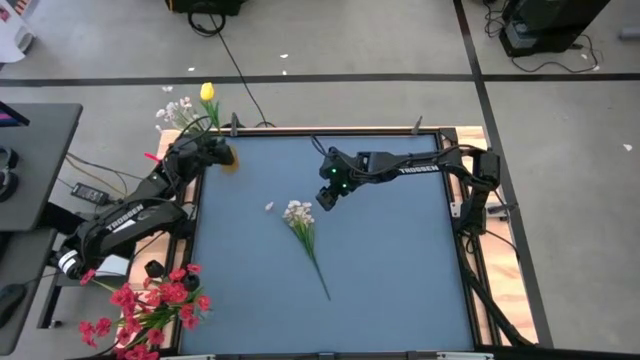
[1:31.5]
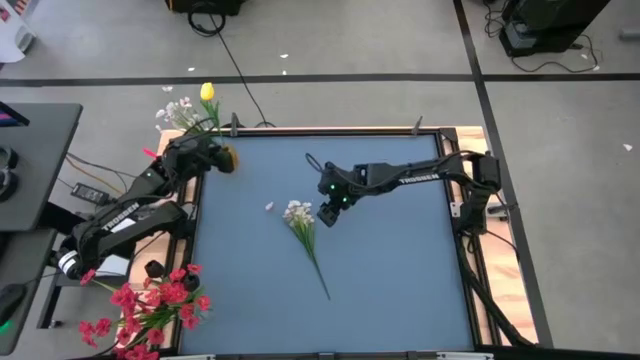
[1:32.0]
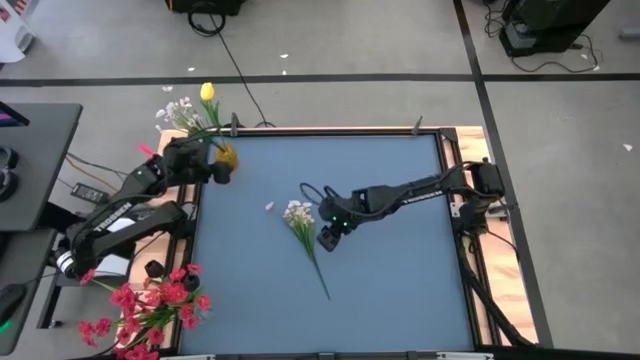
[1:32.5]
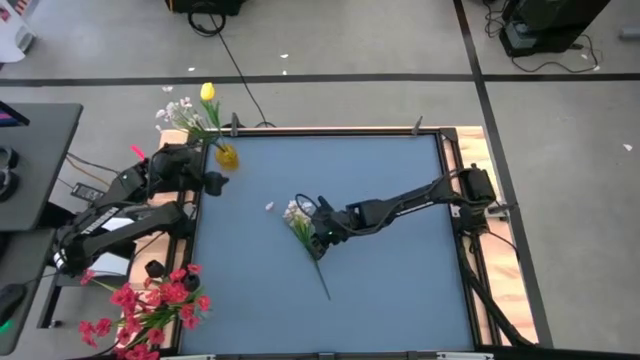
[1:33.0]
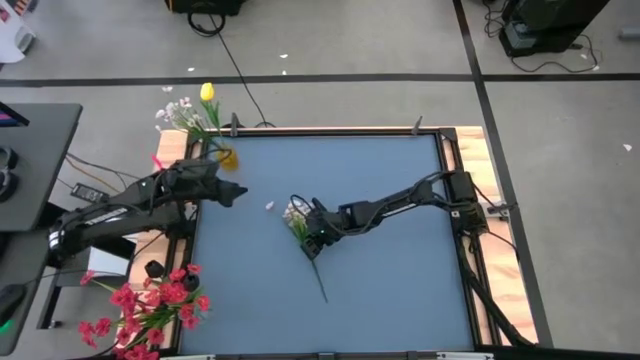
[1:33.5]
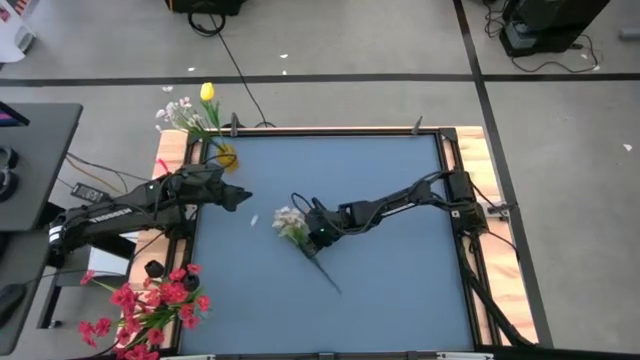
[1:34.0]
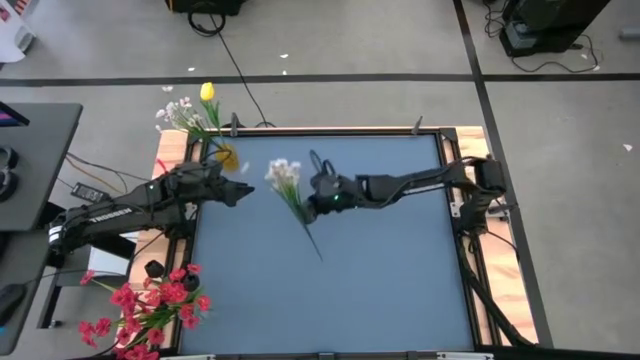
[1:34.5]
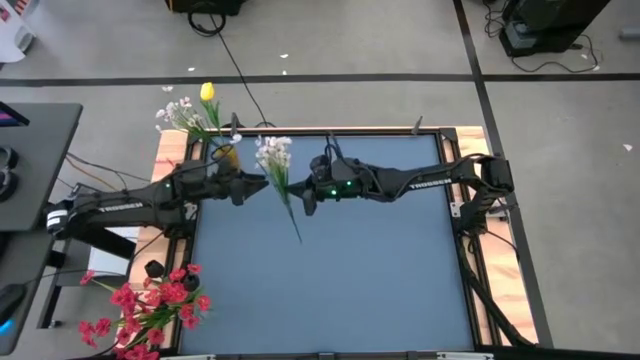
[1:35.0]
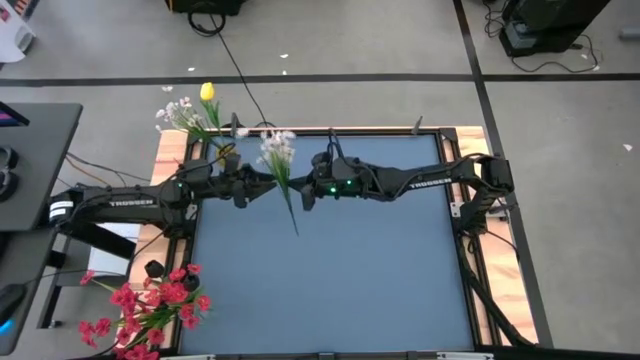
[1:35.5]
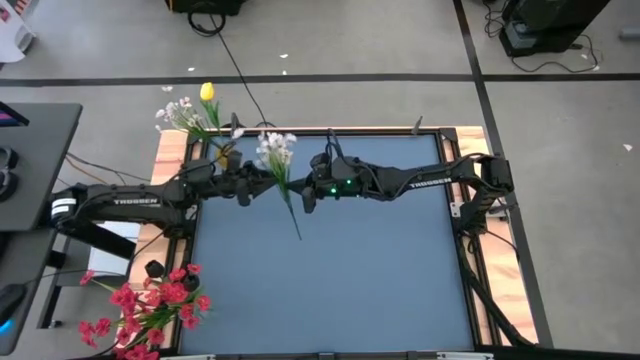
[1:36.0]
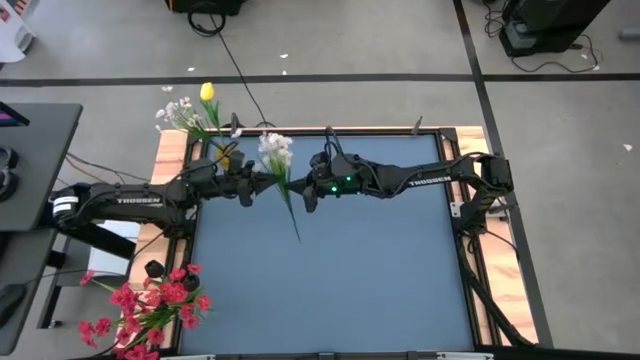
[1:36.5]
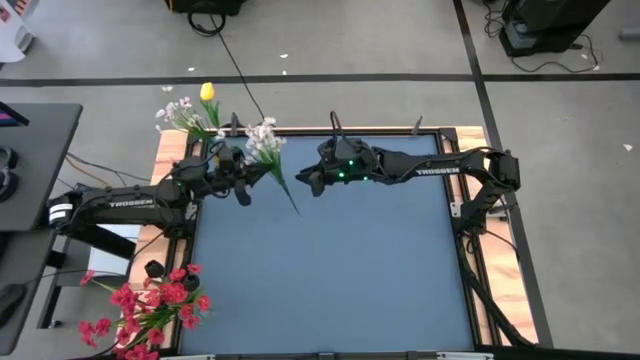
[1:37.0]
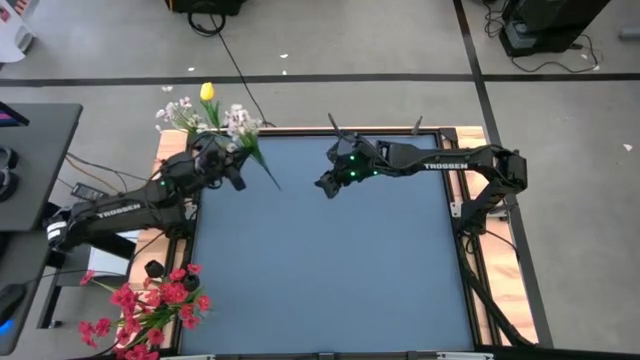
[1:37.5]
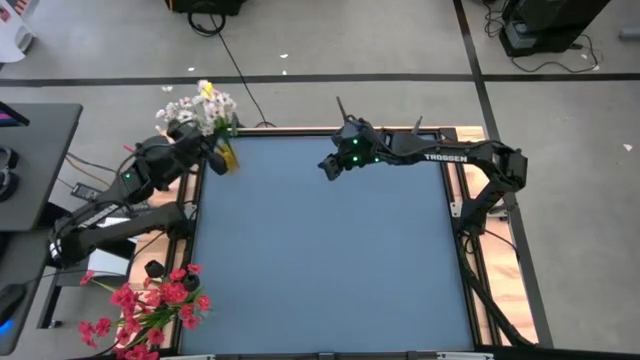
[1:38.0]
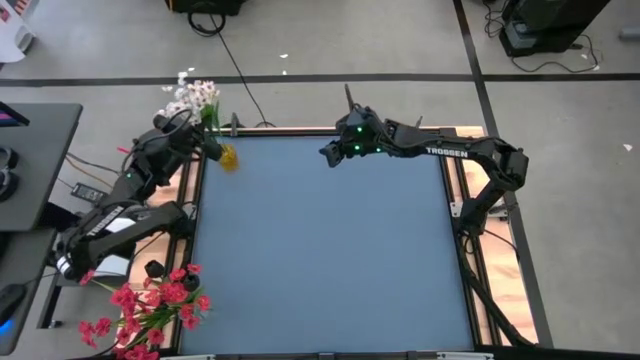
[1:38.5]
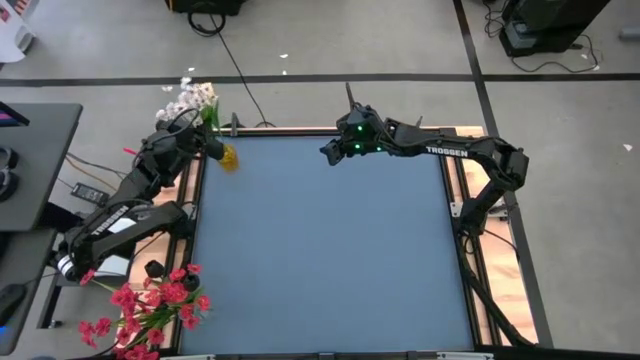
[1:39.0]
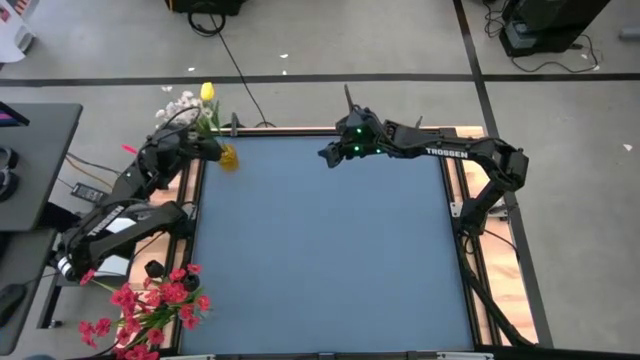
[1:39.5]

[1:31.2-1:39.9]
Task: Sort flowers into vase by color
Put the white flowers into the yellow vase

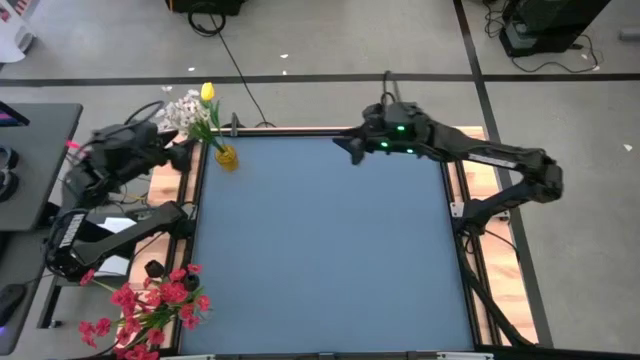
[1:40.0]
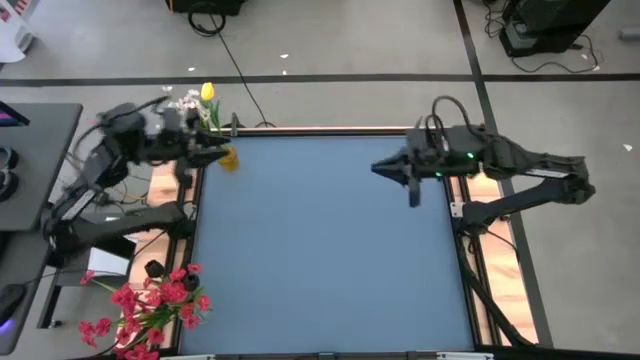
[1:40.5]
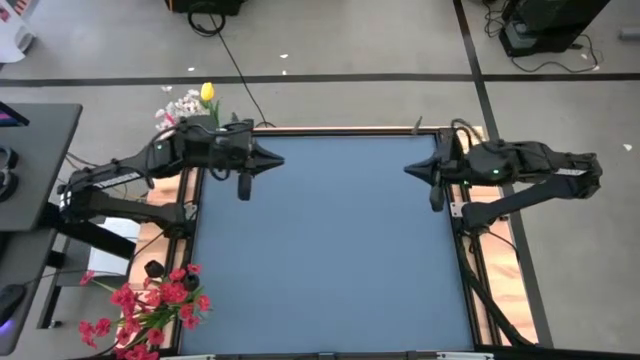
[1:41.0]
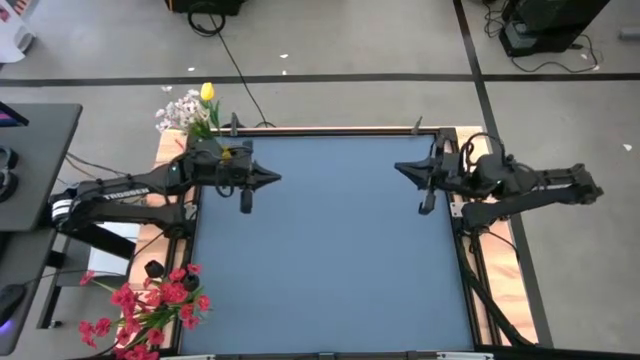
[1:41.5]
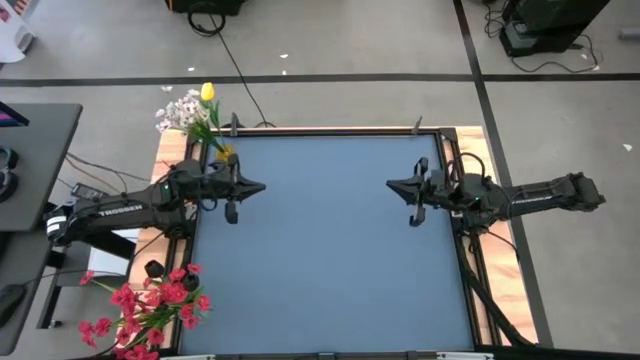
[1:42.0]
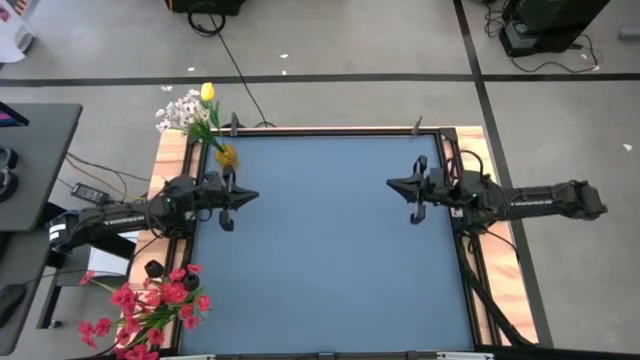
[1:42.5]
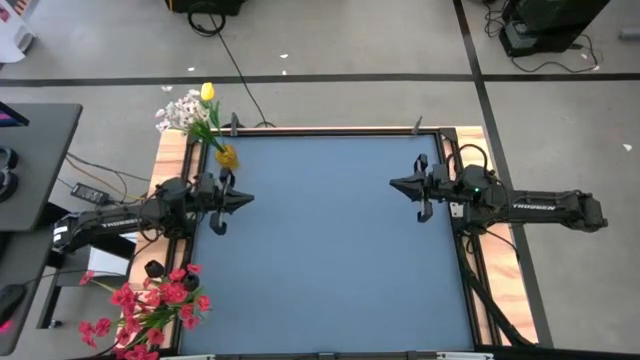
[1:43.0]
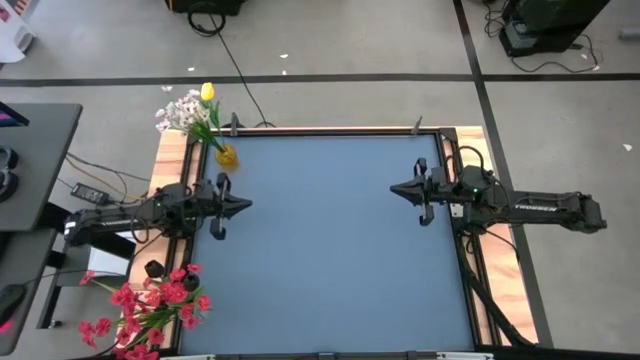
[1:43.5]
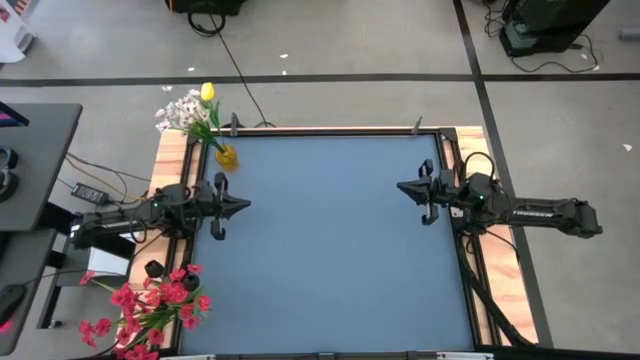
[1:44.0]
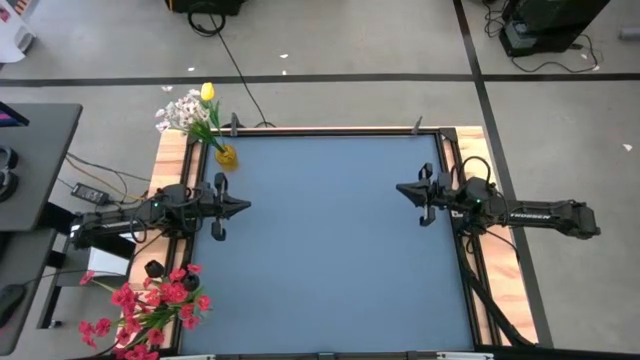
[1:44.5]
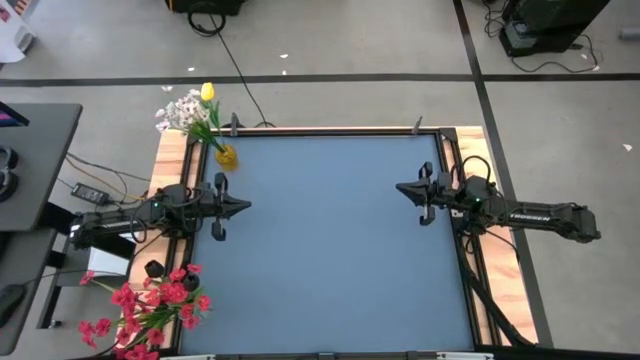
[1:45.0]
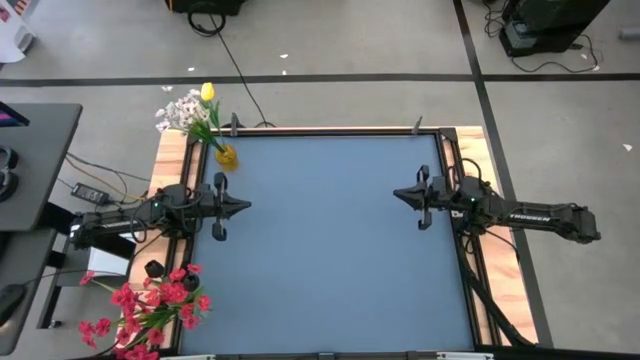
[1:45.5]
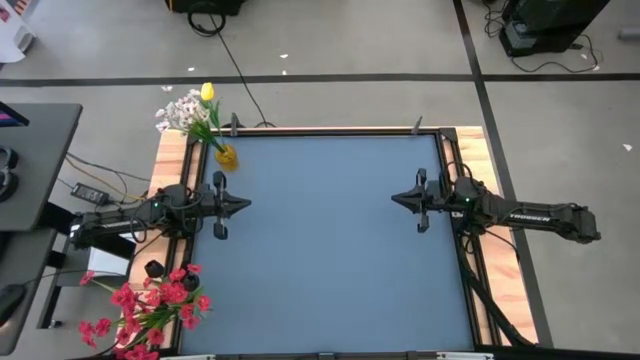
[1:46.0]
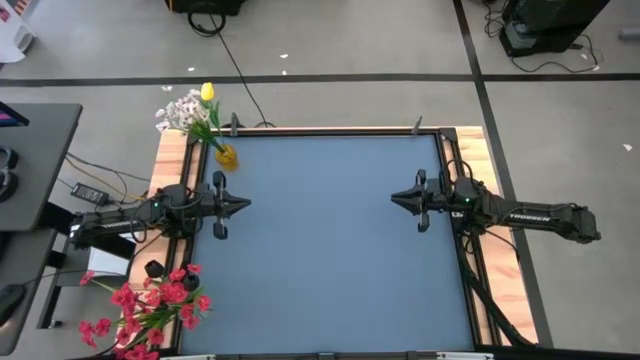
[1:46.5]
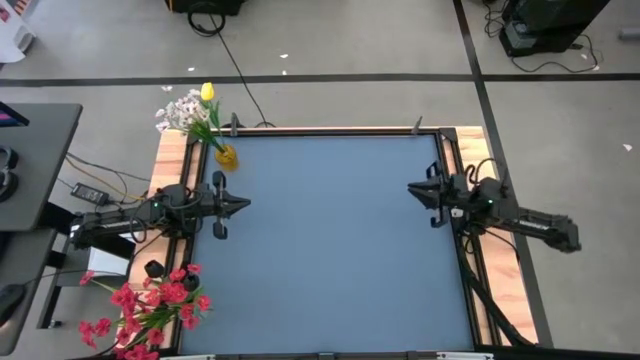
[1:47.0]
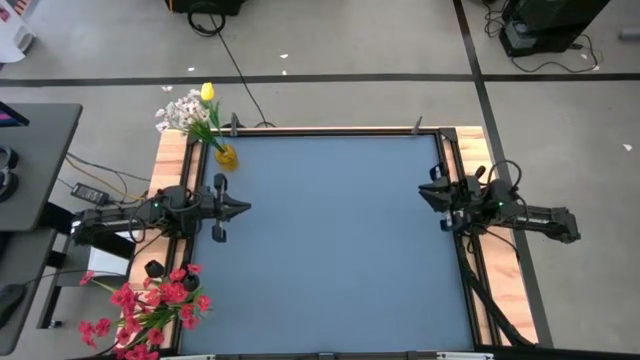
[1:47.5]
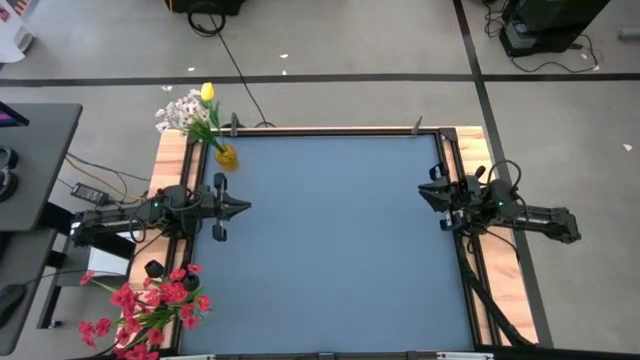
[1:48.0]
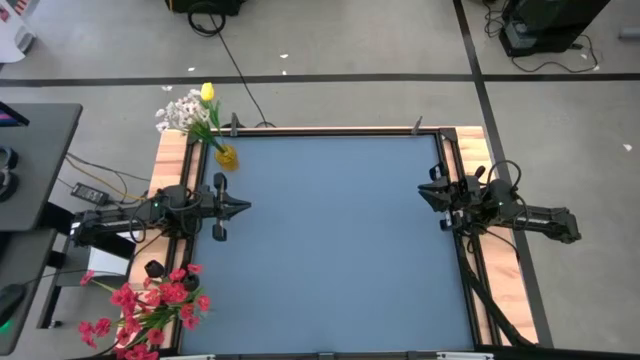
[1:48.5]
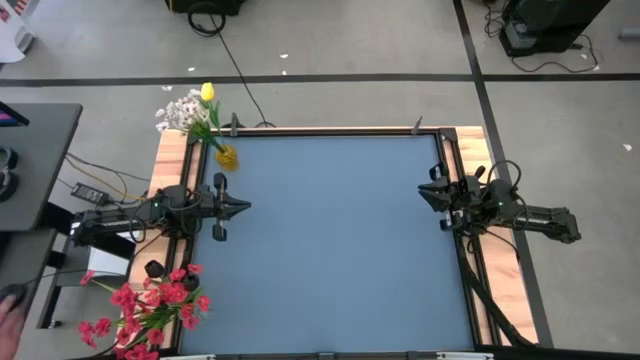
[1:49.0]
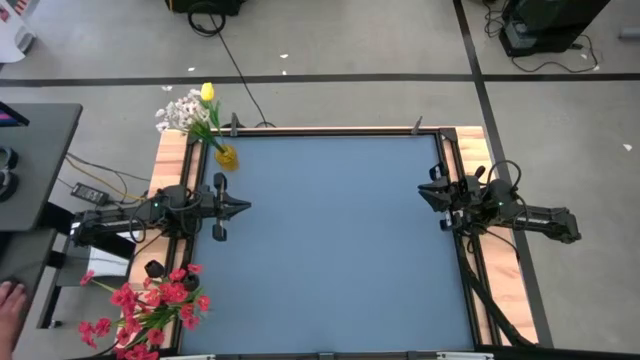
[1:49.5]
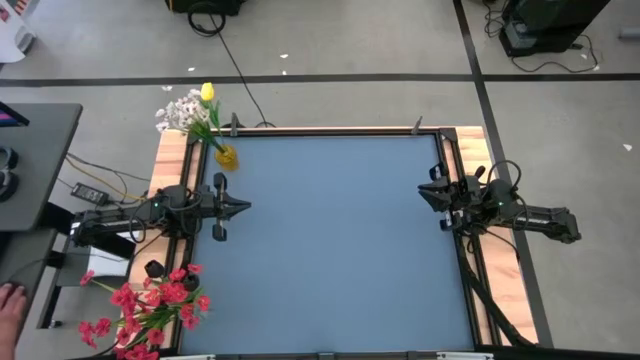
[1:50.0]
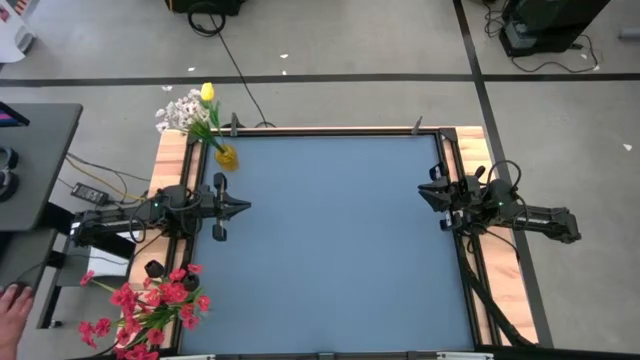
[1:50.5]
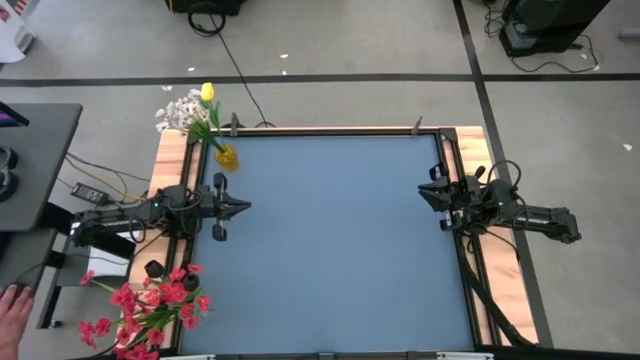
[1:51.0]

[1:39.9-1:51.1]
Return to Home Position

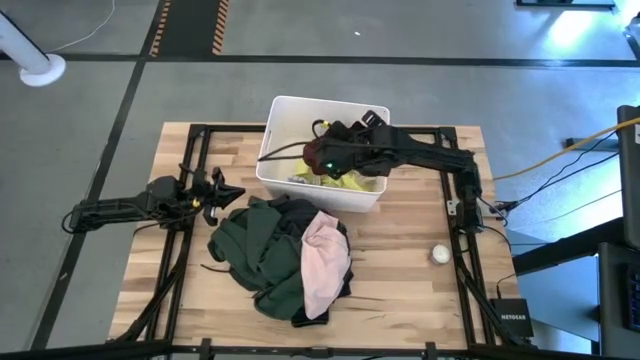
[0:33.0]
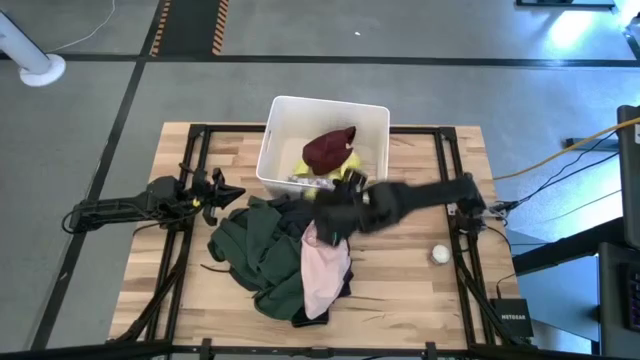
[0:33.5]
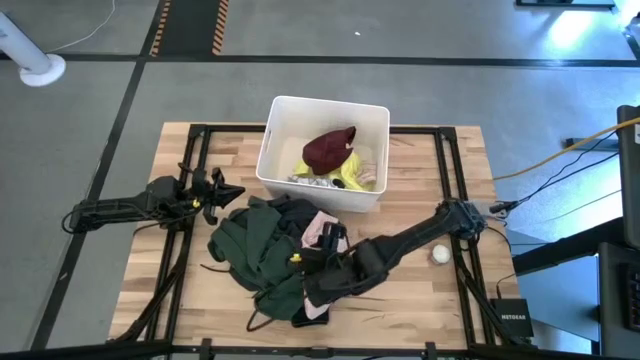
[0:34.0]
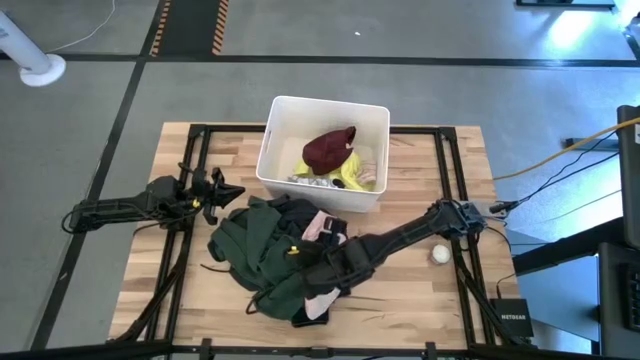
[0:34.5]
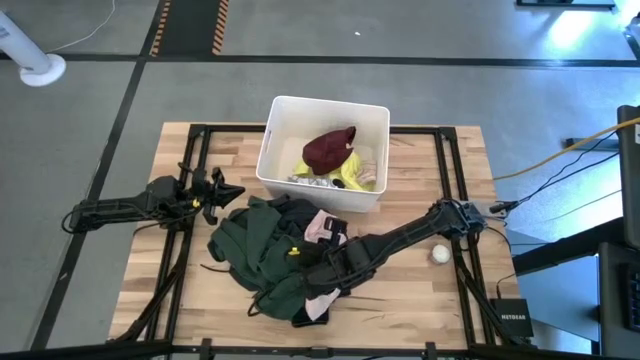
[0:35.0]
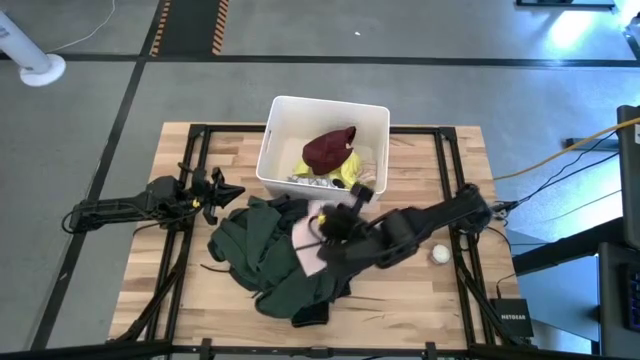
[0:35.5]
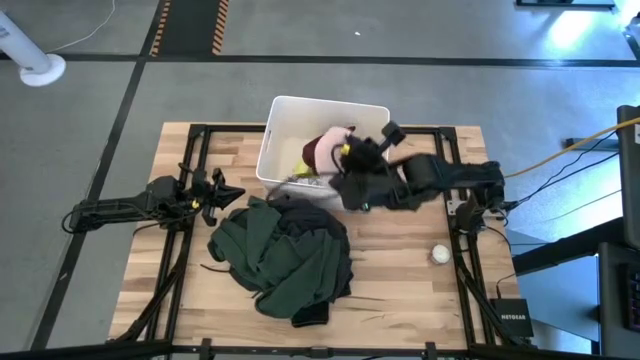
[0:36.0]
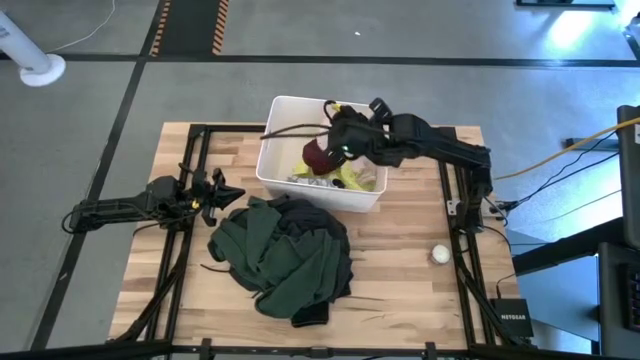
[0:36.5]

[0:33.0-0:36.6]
Task: Sort clothes
Put the pink underwear into the white bin
